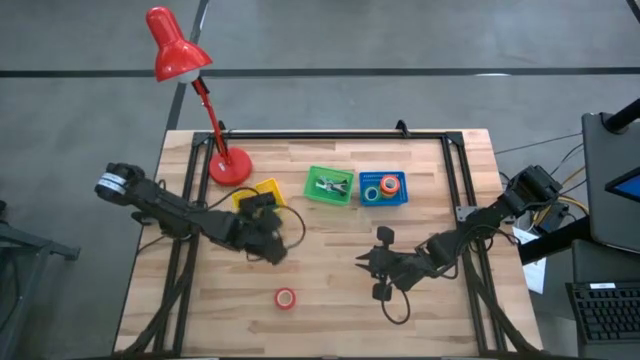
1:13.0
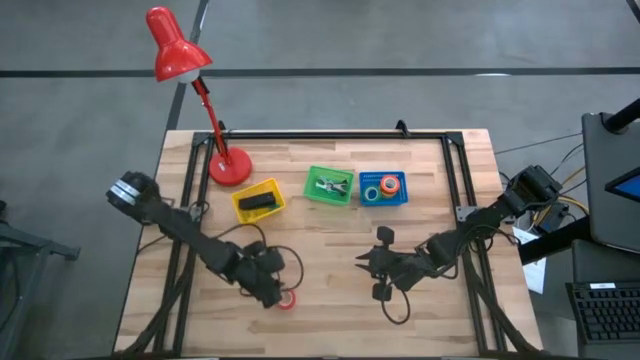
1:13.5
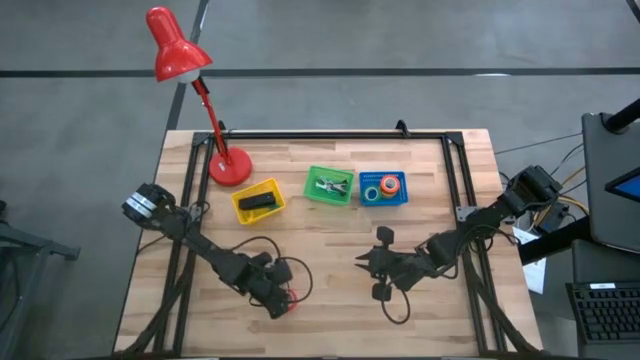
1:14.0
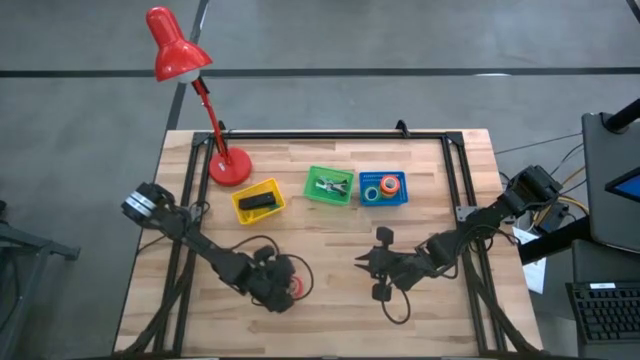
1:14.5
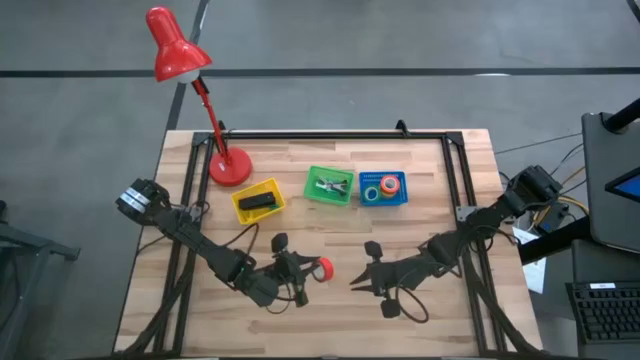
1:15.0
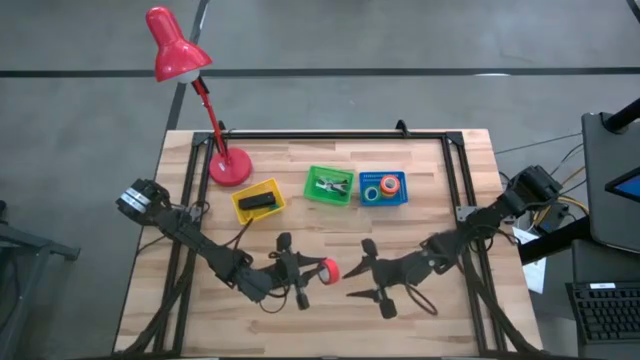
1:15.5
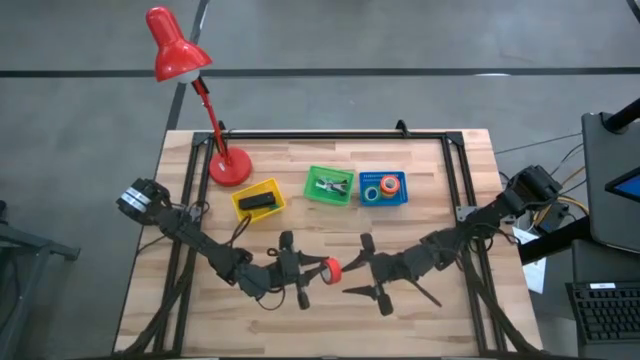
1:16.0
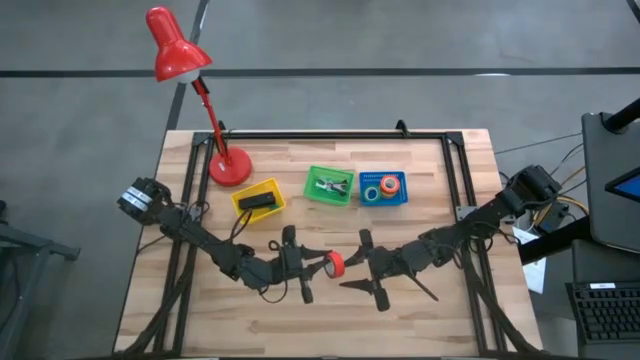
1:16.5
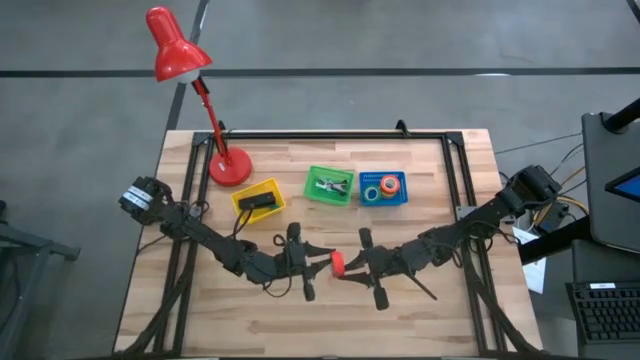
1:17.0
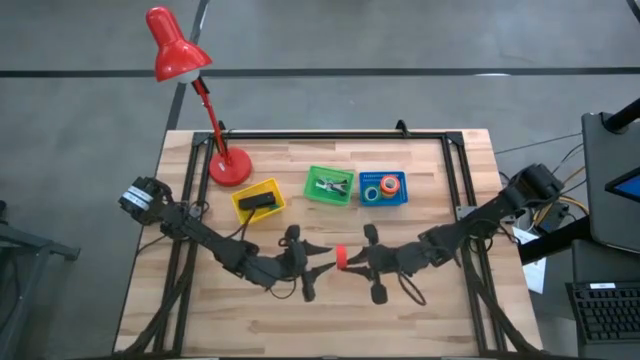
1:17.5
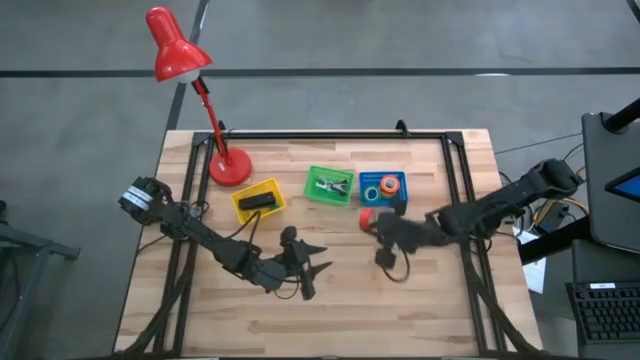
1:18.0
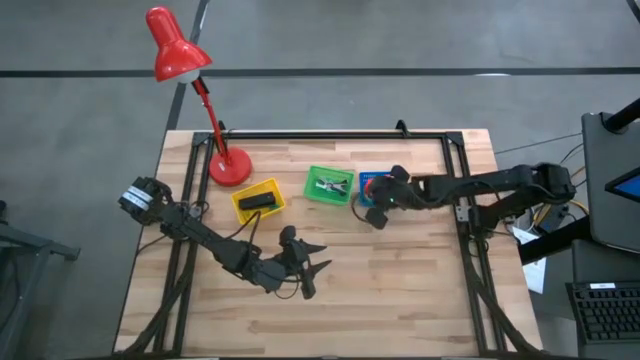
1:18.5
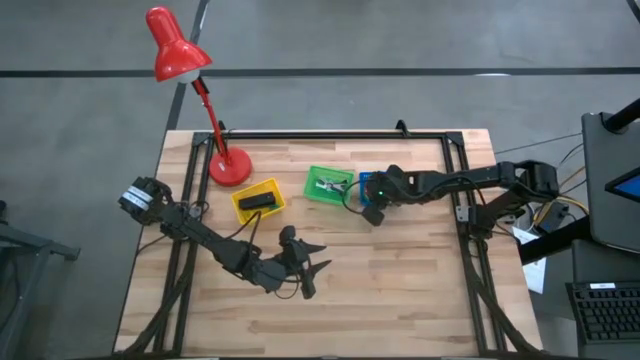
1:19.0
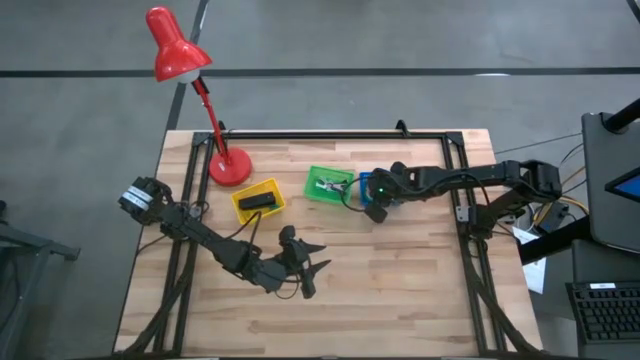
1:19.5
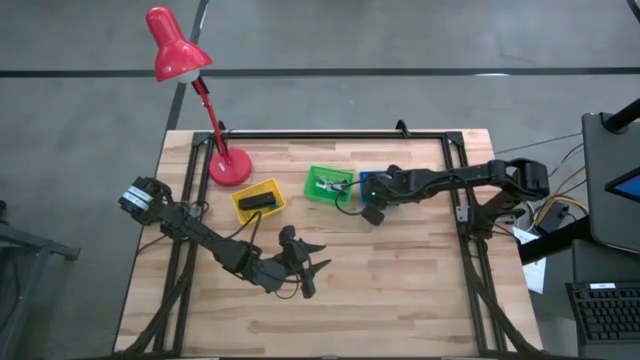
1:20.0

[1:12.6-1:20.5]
Task: Pick and place Stapler, Stapler remover, tape
Put the red tape in the blue basket

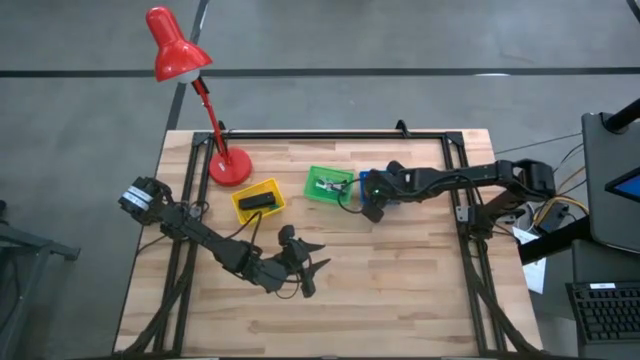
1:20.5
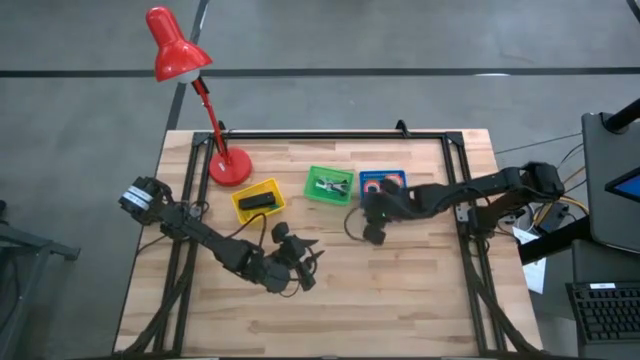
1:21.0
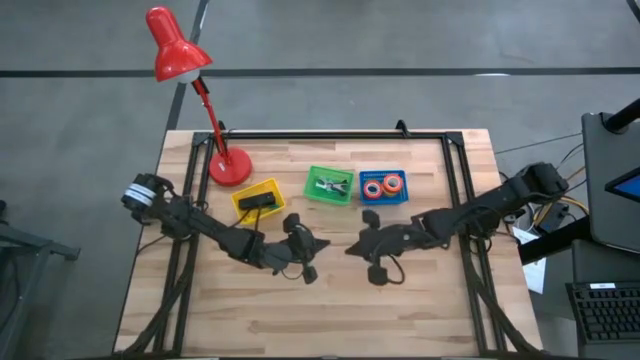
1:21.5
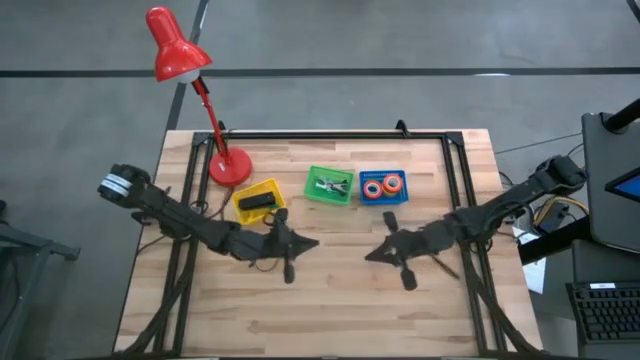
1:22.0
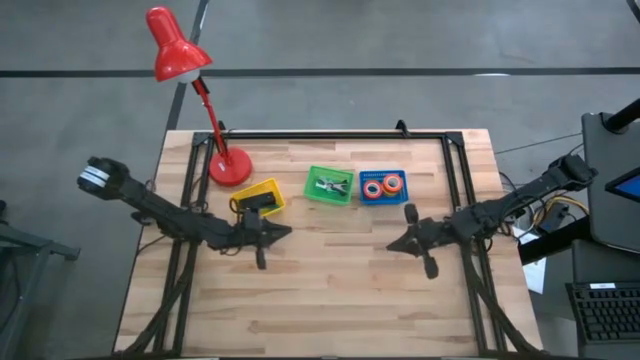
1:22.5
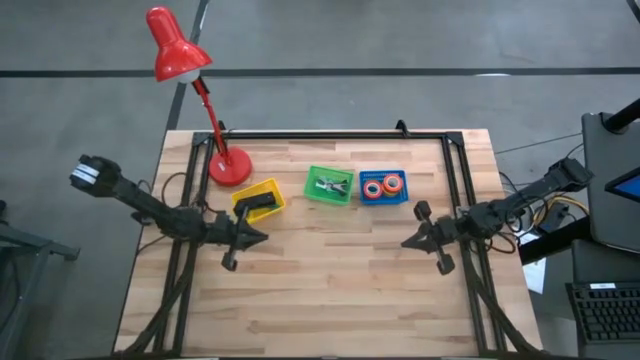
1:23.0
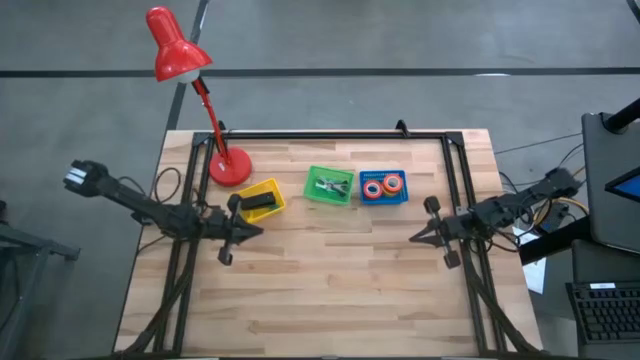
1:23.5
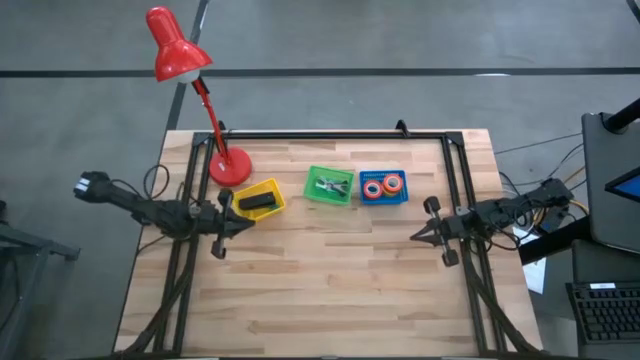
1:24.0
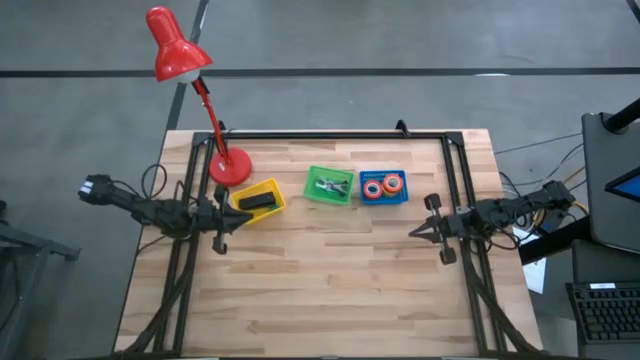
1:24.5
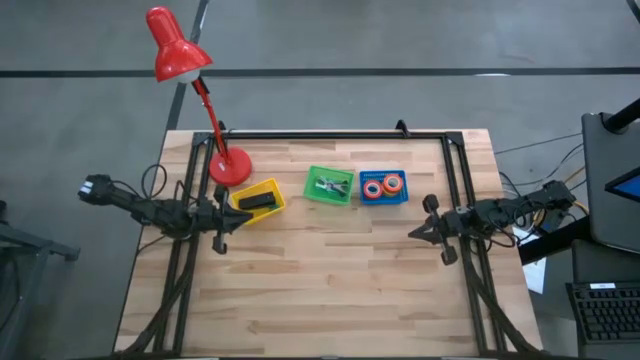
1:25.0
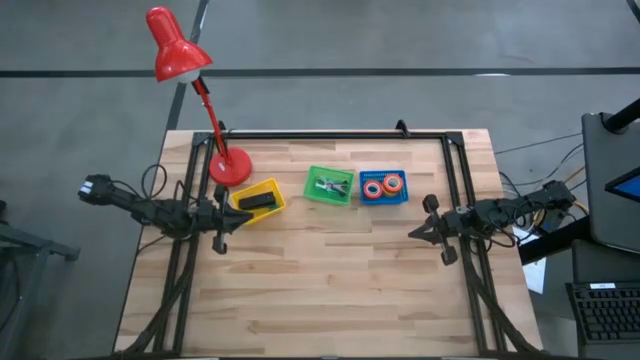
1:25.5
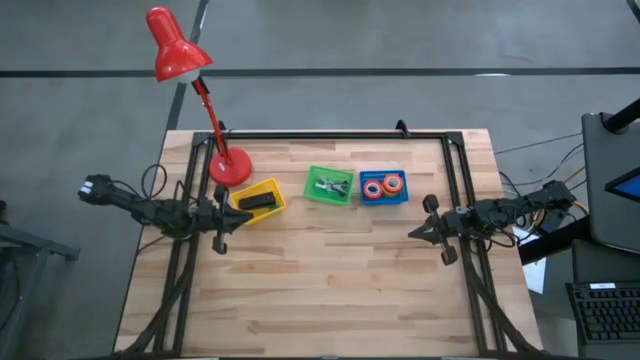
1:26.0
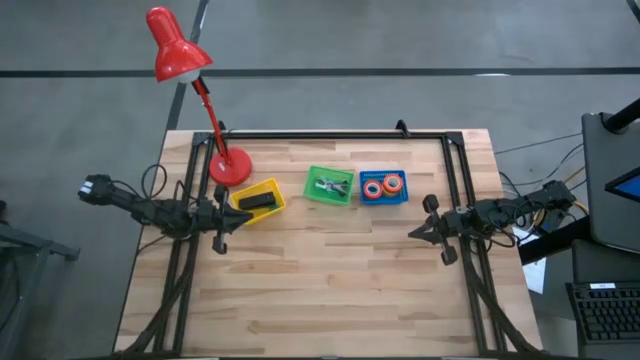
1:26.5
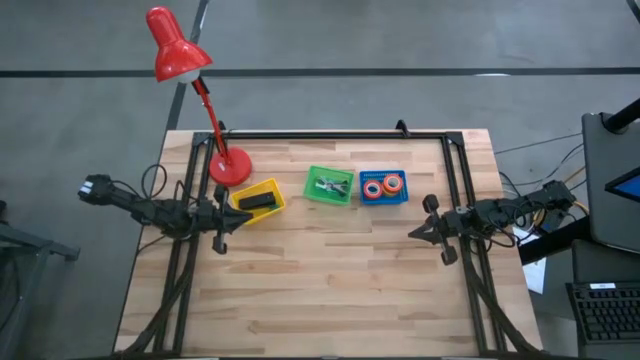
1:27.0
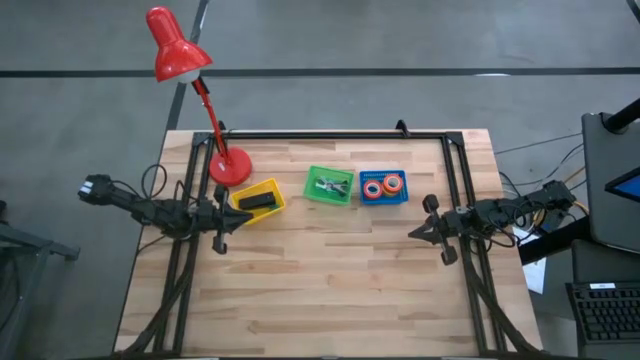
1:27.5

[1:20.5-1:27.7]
Return to Home Position

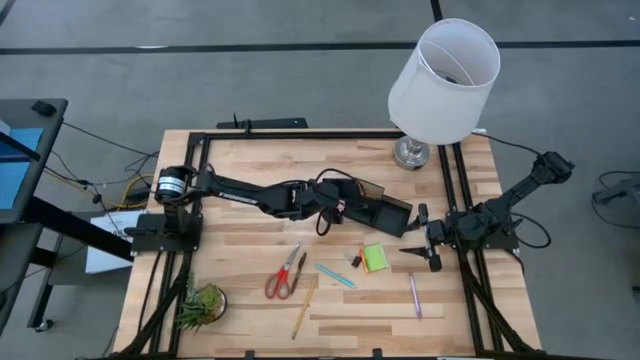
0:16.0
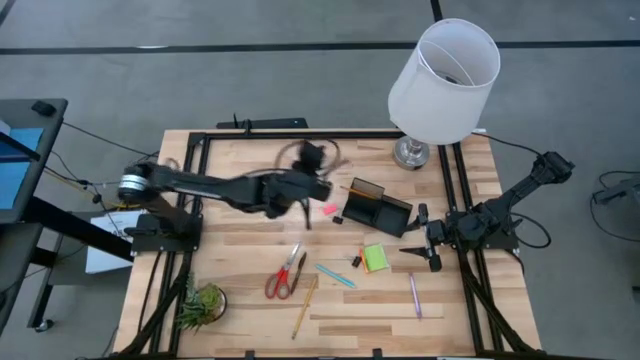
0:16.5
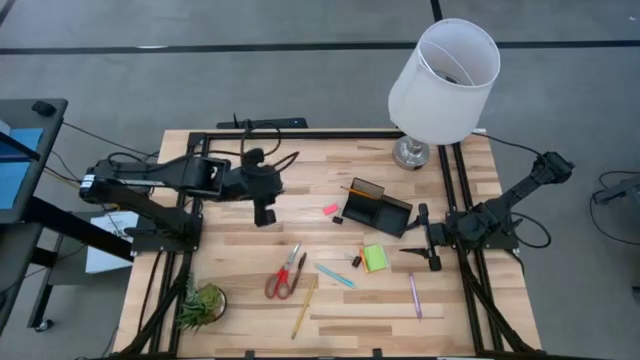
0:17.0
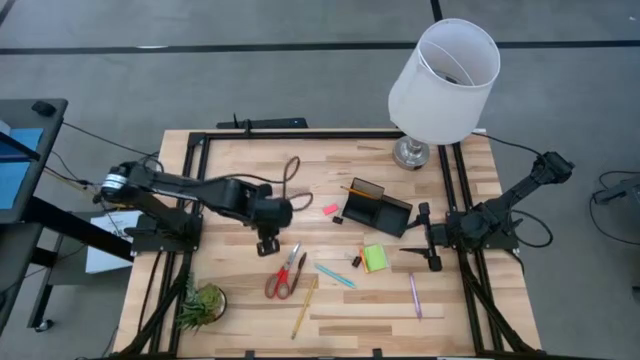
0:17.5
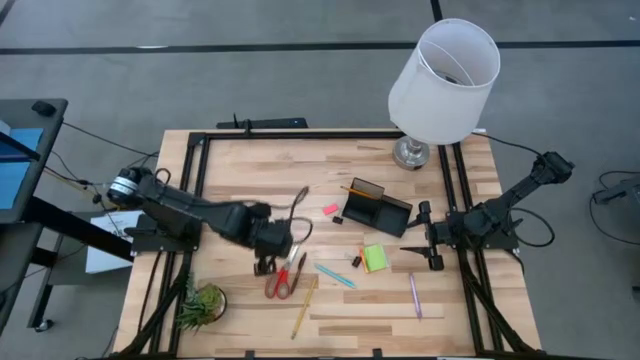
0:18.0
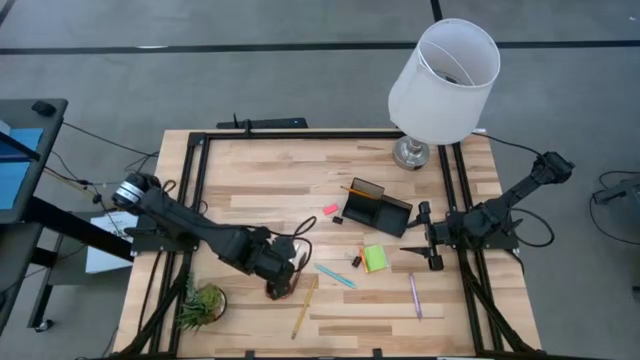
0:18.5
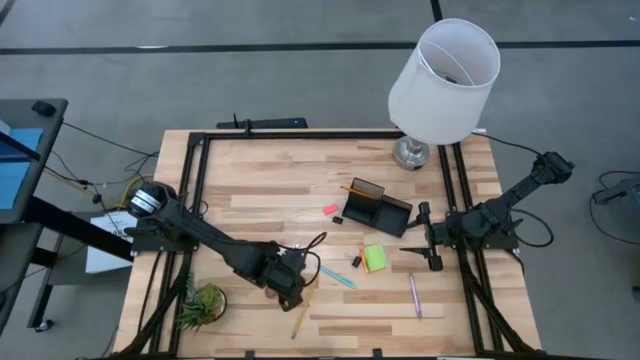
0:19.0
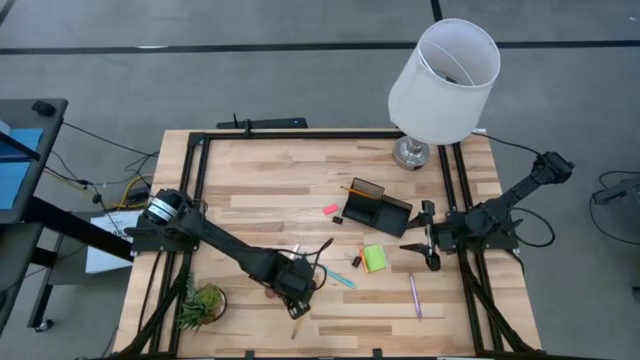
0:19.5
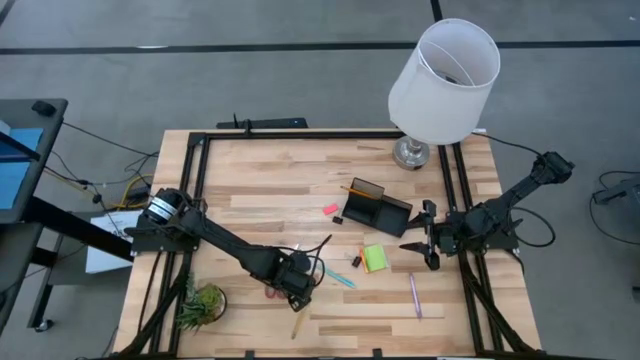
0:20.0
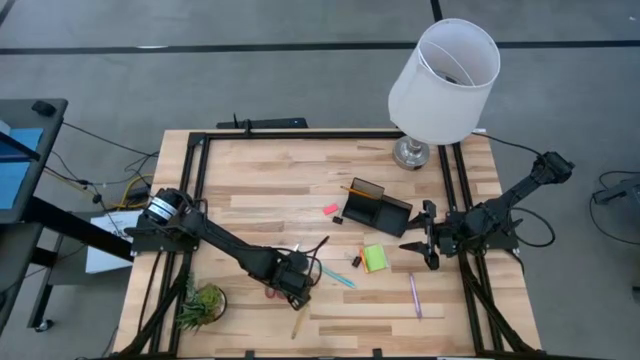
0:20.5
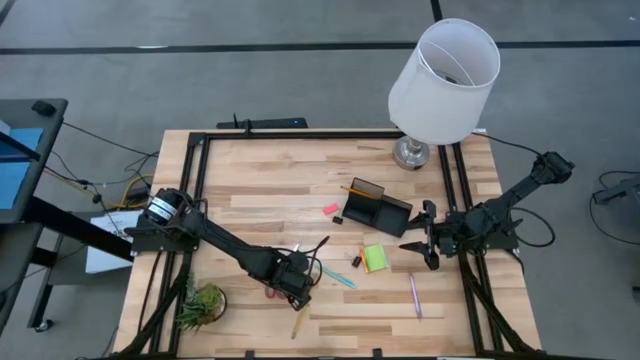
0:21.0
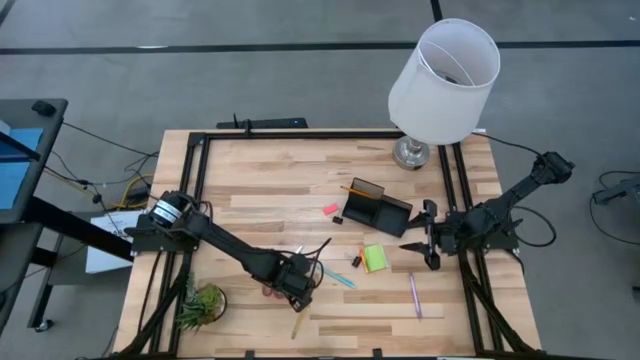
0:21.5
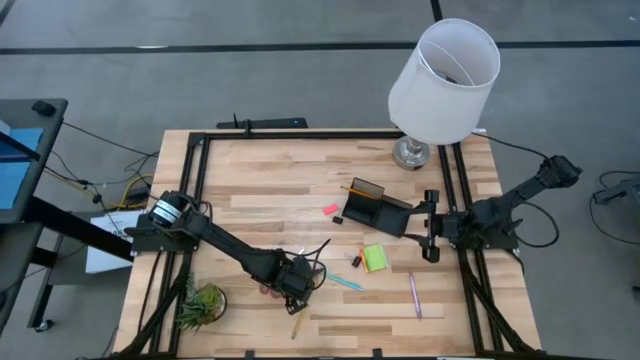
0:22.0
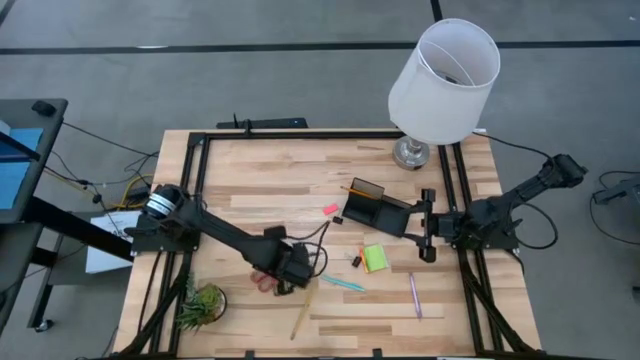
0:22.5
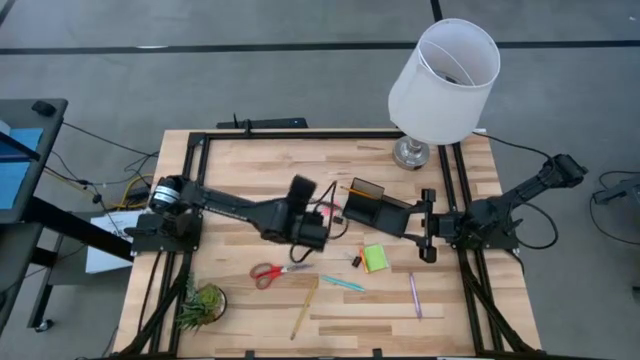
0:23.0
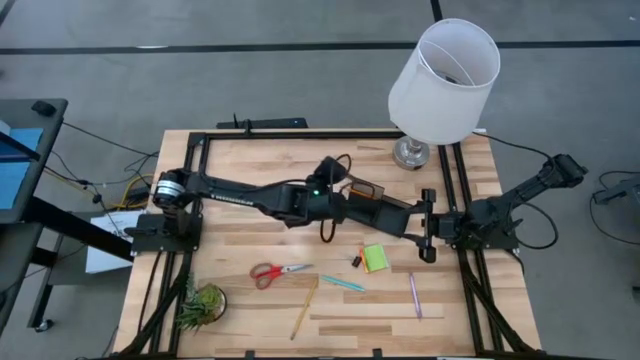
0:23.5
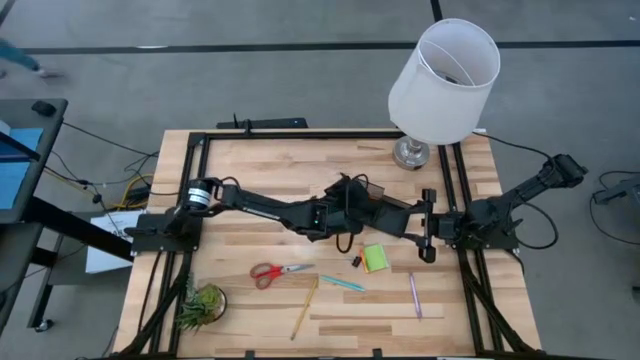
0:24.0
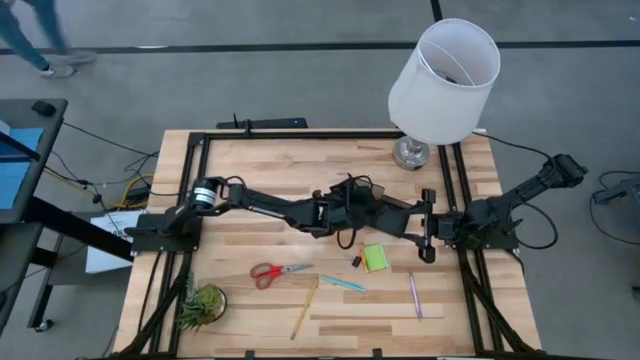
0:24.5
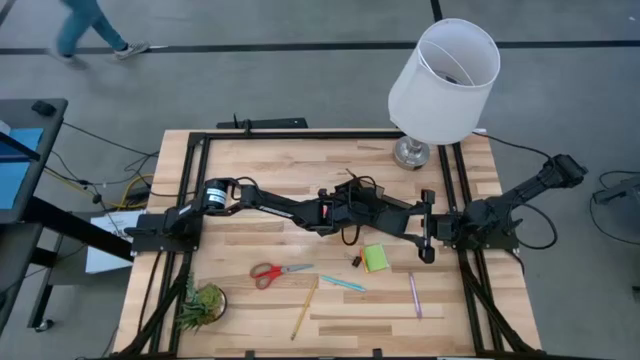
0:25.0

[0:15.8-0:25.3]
Task: Pick and place office supplies into organizer
Put the brown pen into the desk organizer
